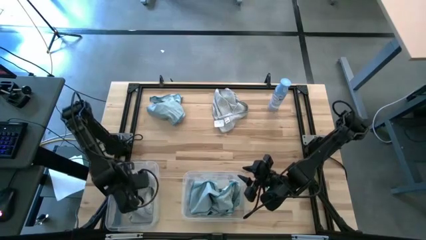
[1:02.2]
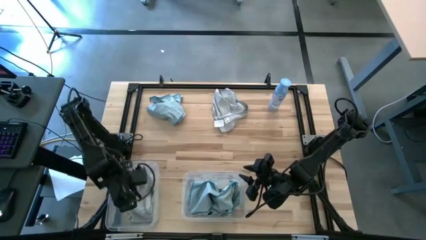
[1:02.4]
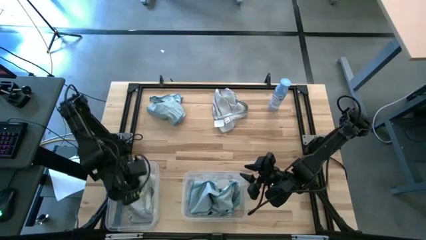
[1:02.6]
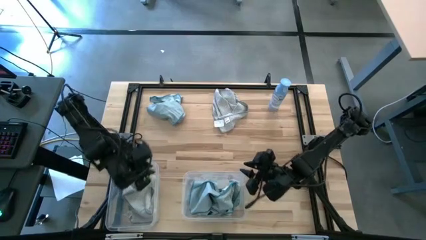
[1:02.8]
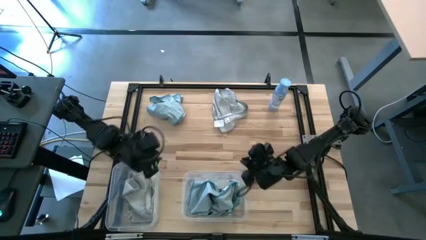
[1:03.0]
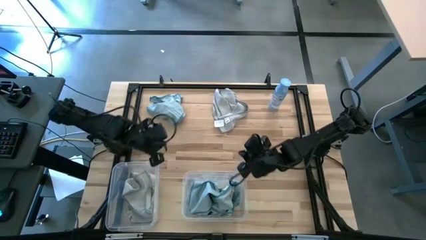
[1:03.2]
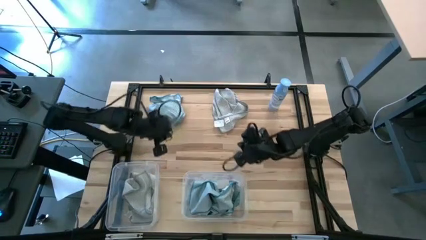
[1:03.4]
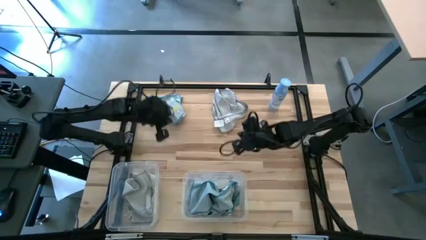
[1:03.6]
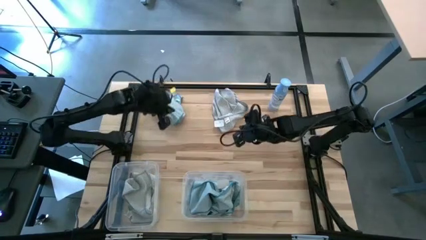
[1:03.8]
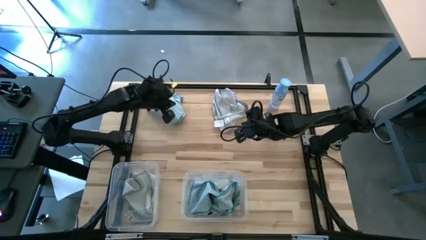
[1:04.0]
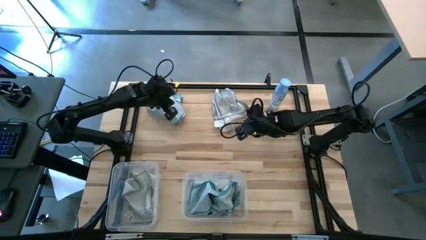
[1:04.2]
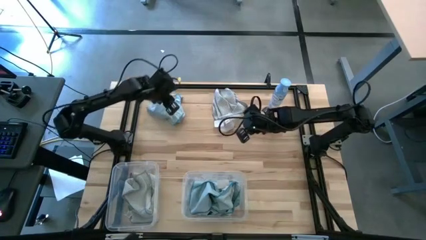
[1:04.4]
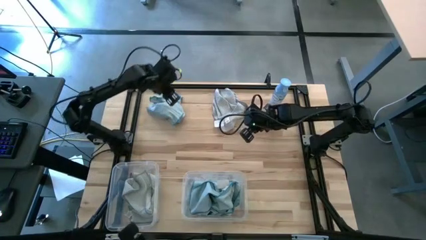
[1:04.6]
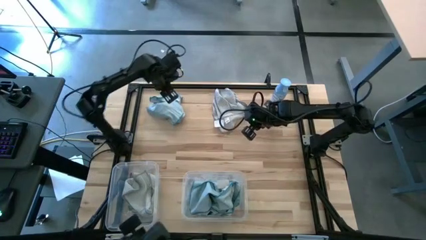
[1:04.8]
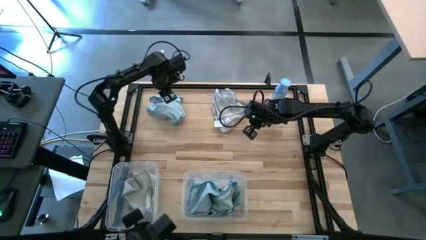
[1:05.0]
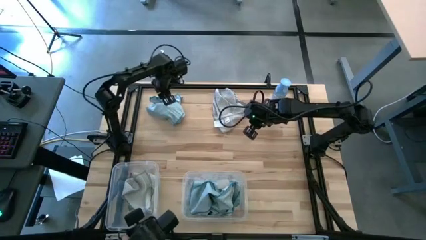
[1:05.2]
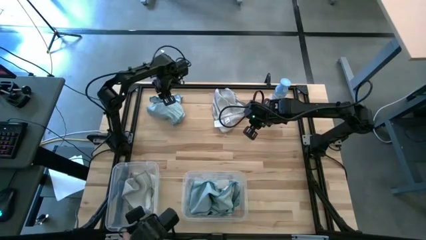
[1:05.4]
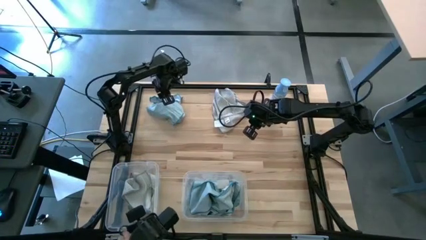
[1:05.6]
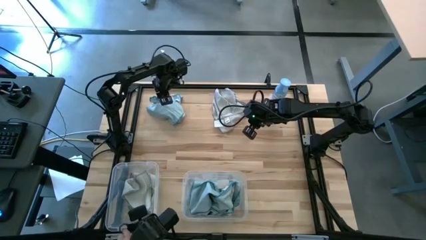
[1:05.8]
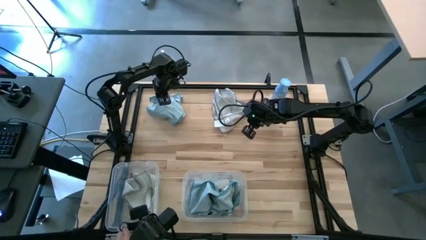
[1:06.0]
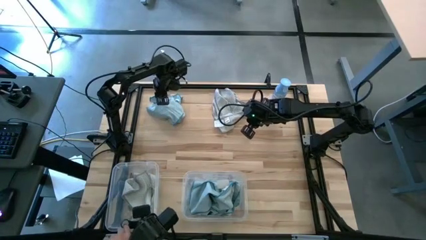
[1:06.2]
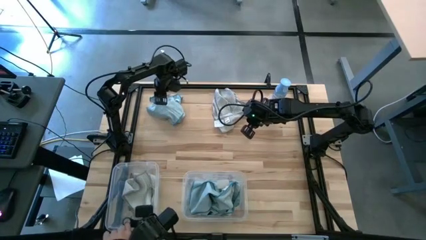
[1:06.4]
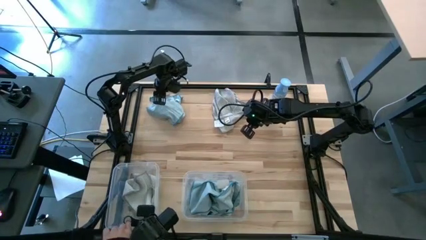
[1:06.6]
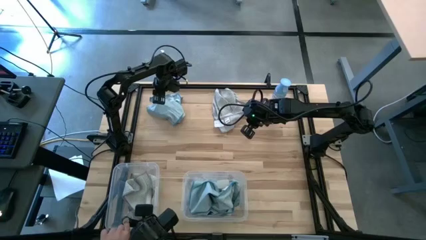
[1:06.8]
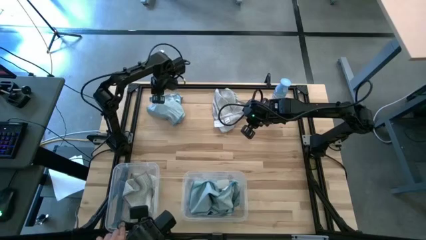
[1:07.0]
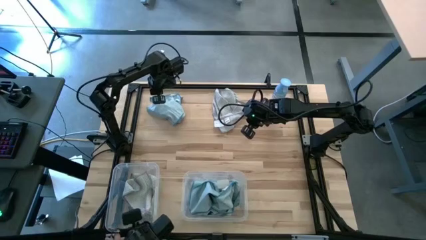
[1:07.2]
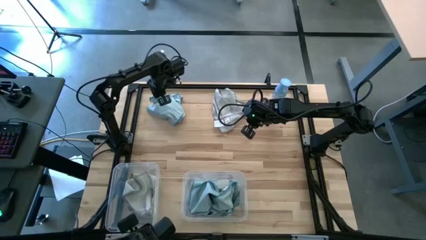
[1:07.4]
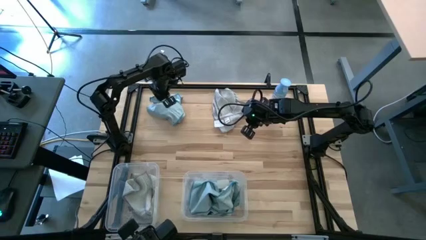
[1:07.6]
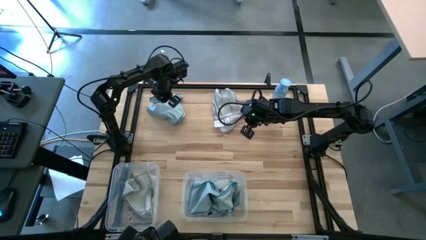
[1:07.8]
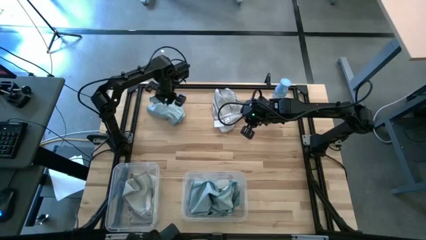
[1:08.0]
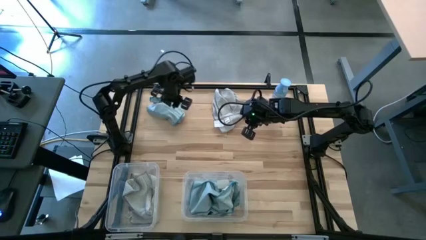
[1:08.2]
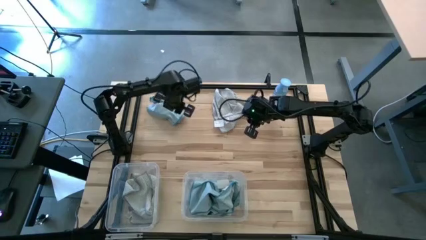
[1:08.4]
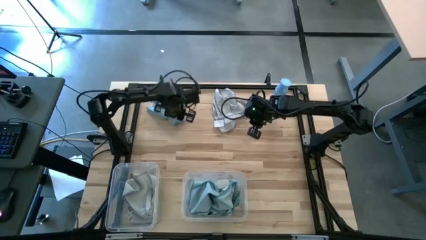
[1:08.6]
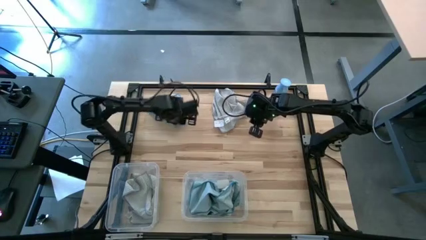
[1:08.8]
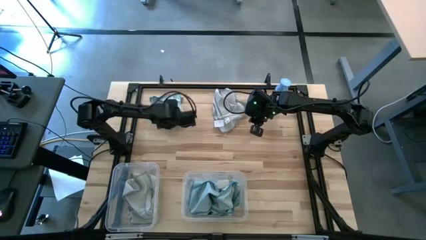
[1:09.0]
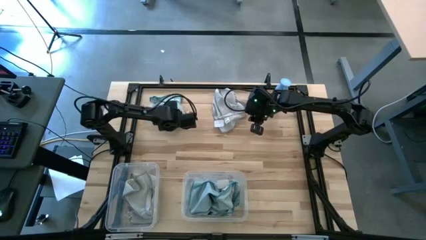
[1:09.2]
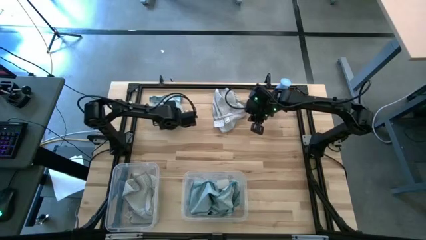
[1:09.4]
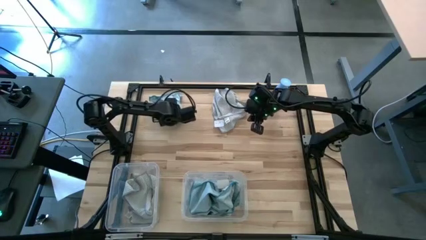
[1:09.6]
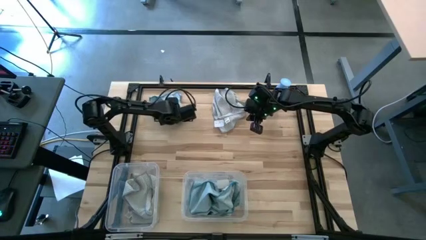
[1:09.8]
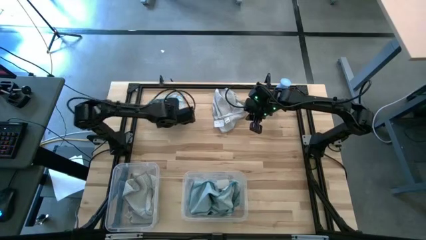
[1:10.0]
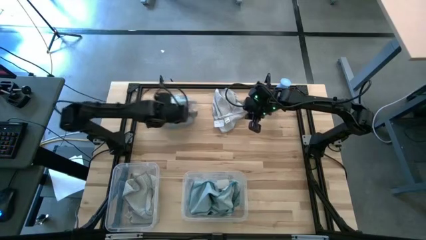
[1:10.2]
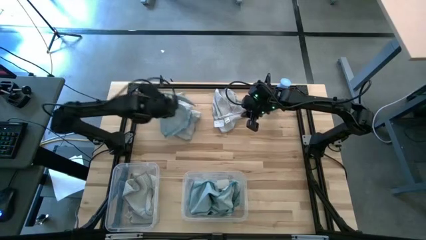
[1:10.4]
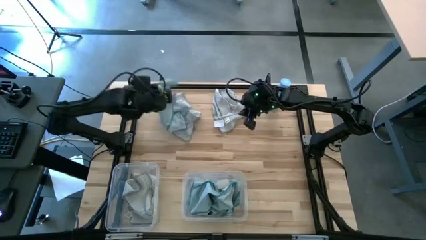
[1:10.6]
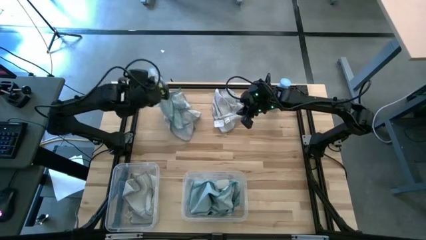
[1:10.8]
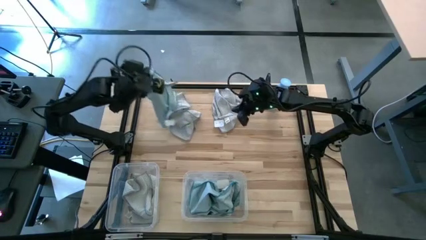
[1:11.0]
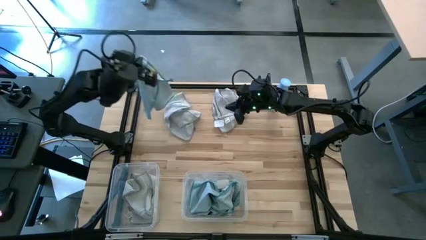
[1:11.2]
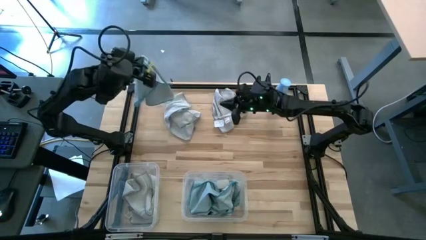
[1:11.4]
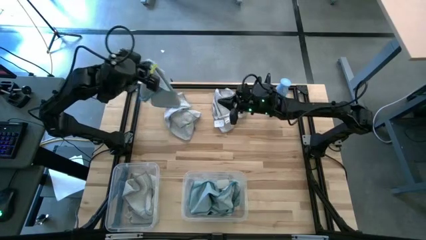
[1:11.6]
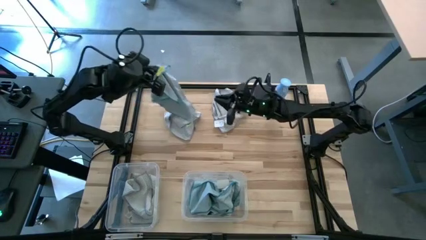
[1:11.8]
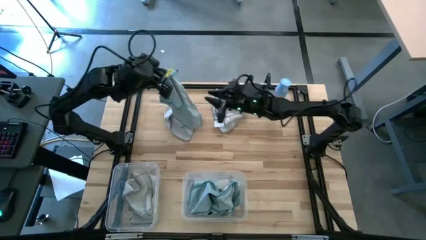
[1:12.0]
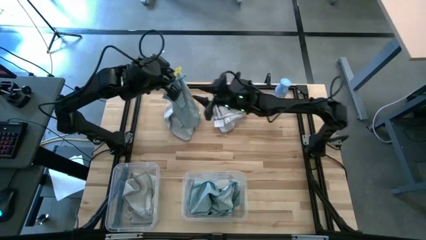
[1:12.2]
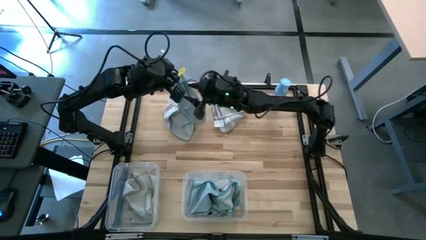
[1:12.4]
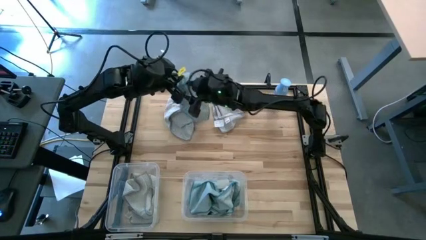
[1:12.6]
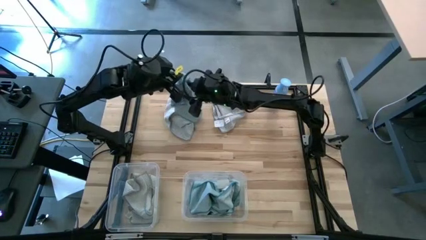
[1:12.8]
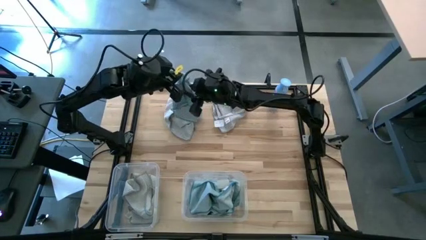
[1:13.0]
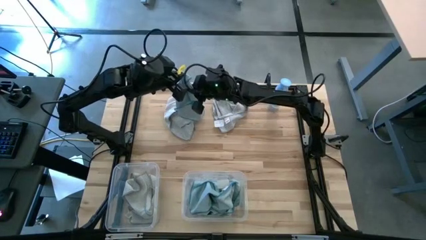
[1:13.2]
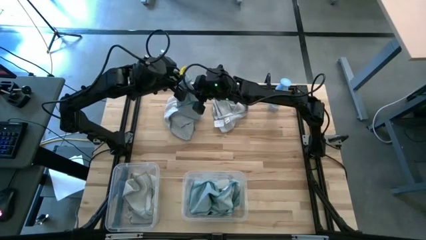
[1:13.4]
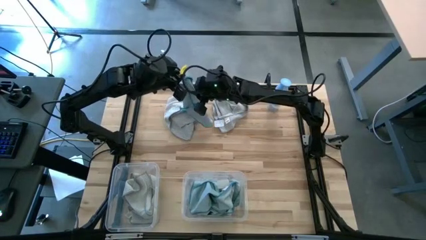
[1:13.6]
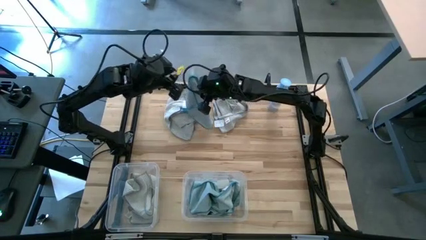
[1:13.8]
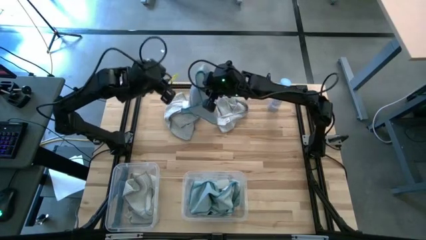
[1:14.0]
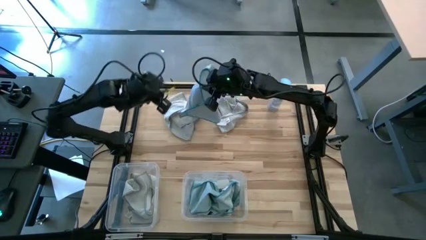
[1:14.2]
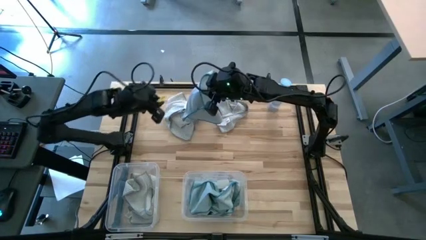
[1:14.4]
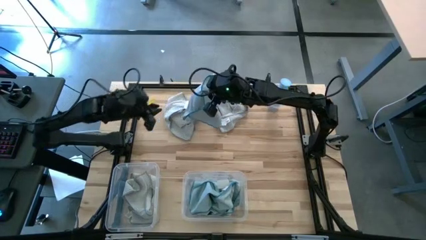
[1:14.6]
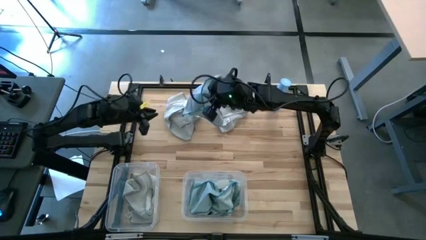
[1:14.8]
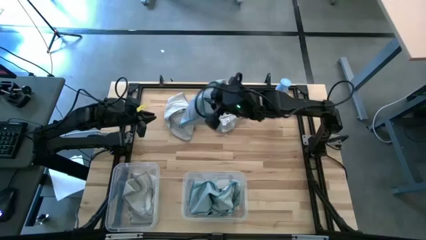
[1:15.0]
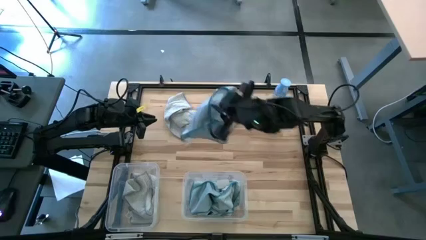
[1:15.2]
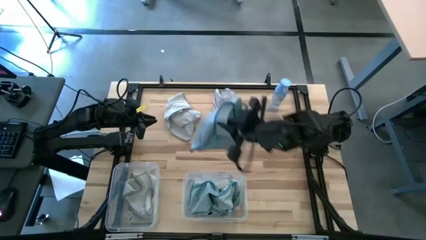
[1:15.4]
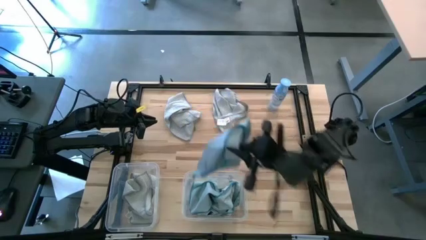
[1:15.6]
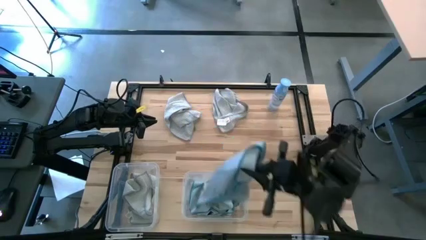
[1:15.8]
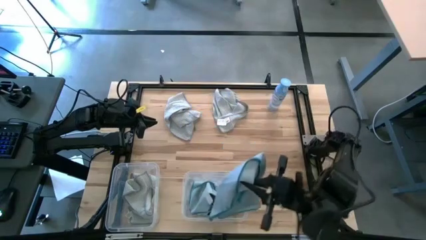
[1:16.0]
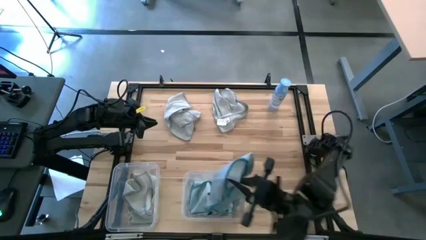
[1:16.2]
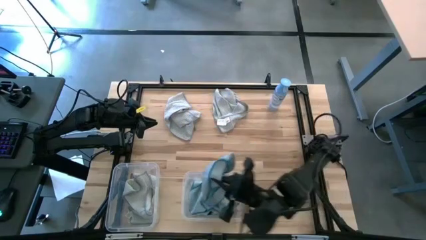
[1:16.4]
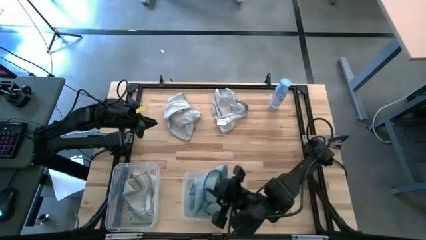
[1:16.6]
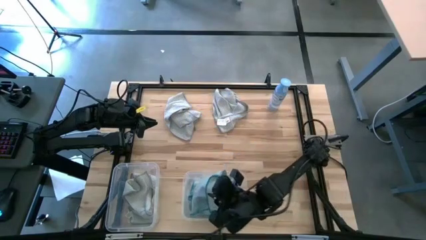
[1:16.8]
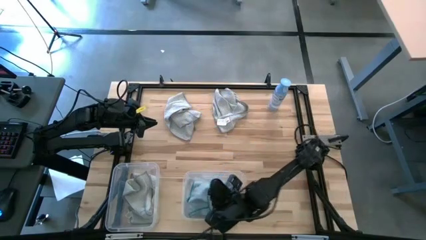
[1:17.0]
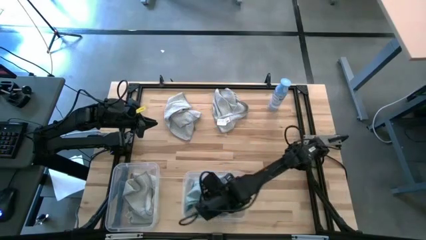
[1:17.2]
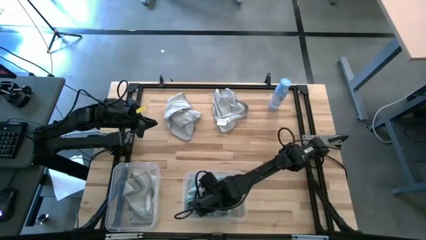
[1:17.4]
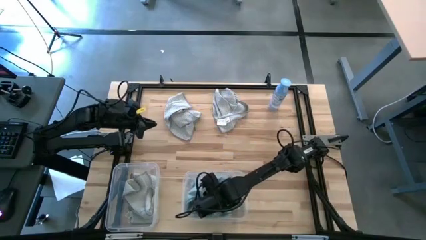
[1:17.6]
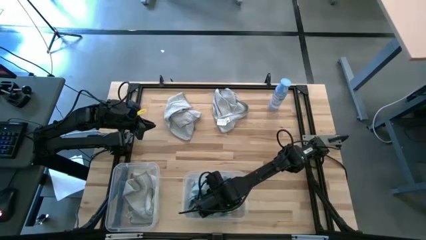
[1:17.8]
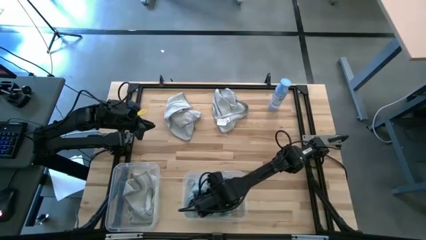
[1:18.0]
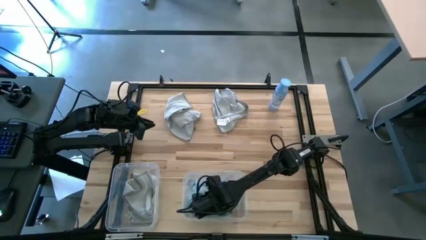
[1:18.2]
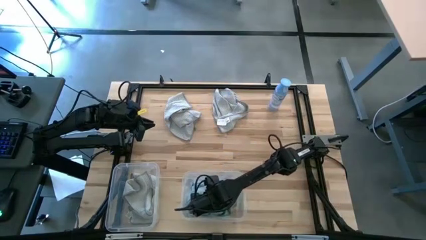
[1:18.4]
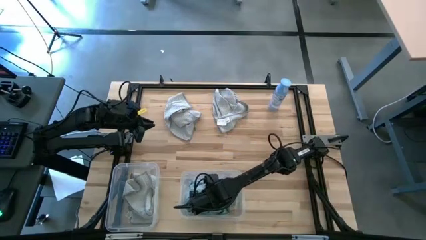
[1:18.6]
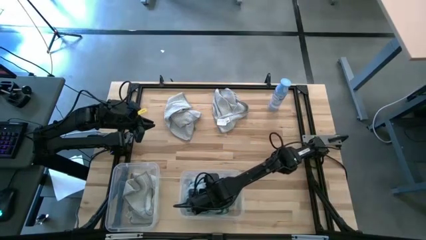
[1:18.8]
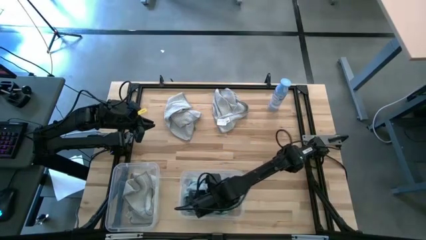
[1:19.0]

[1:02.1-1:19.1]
Task: Sort microfiber towel by color & place in baskets
Put the blue towel into the right transparent bin
